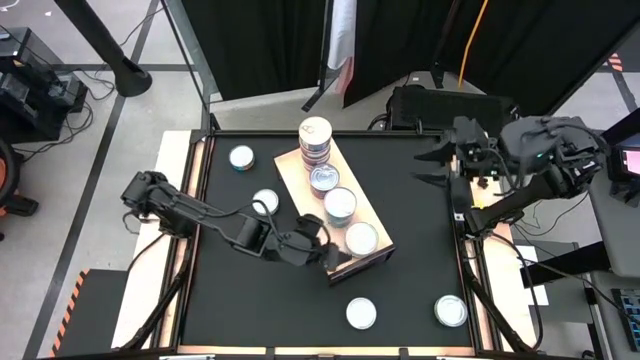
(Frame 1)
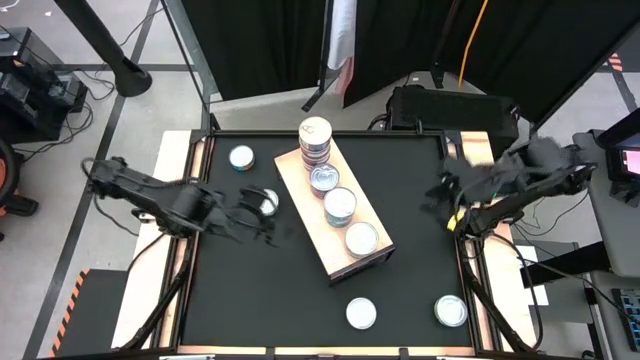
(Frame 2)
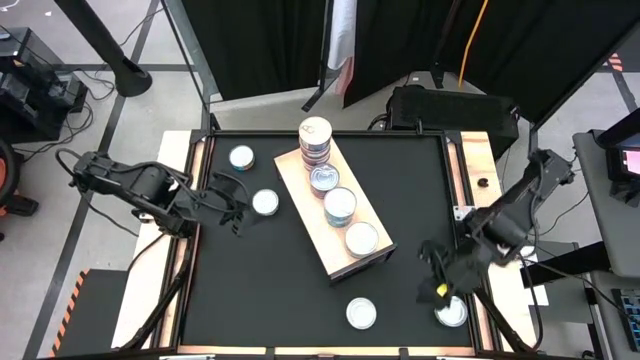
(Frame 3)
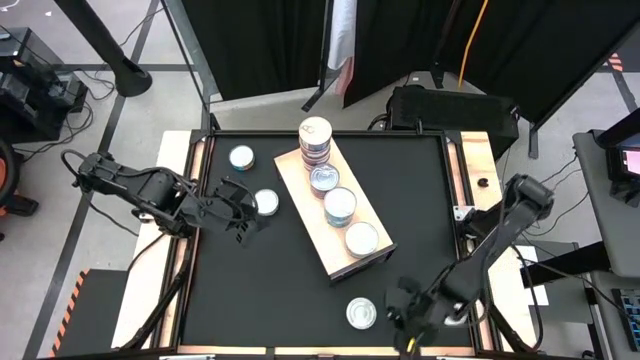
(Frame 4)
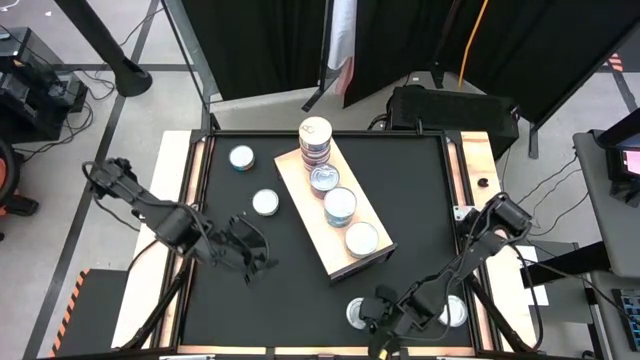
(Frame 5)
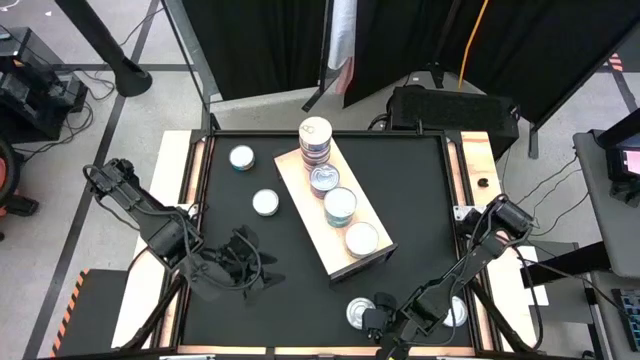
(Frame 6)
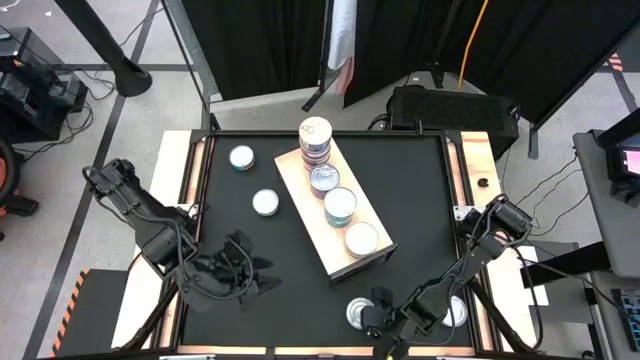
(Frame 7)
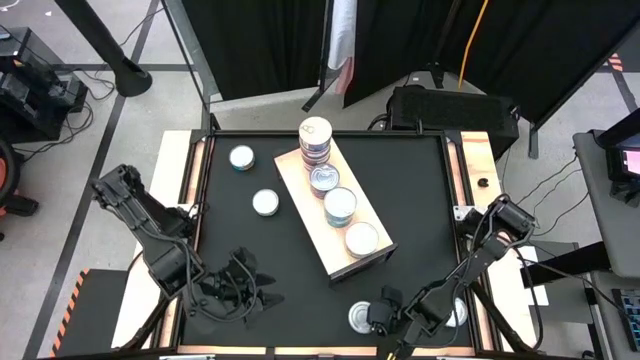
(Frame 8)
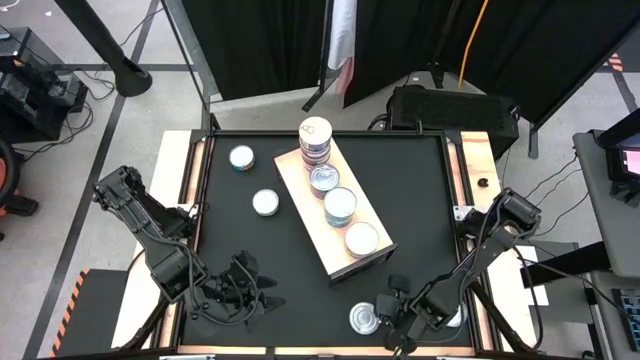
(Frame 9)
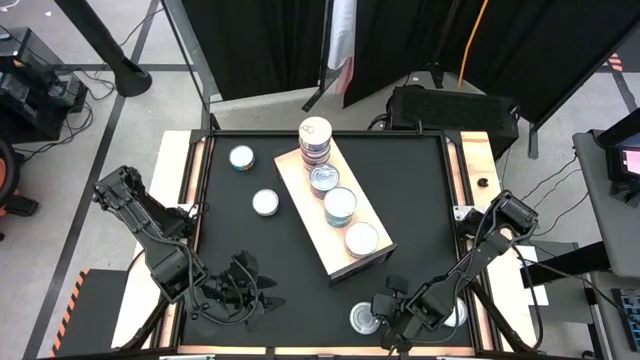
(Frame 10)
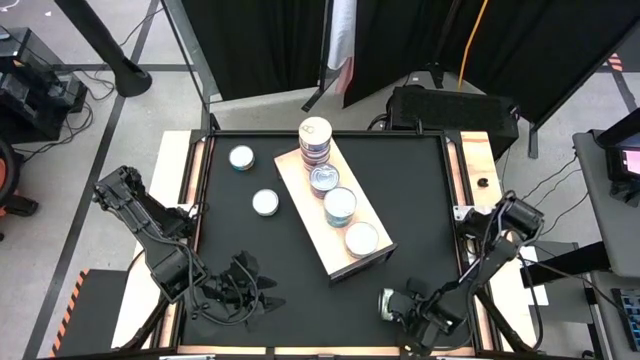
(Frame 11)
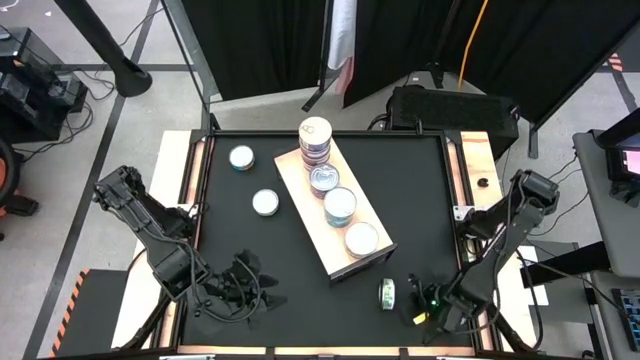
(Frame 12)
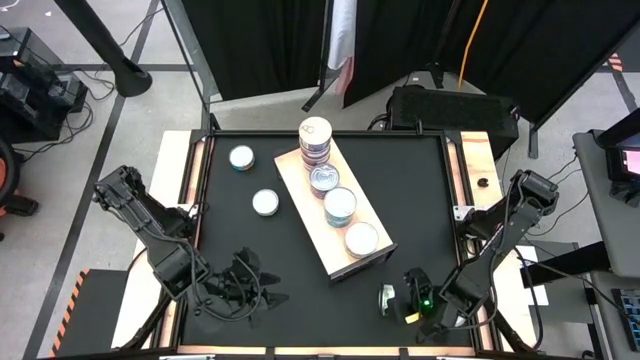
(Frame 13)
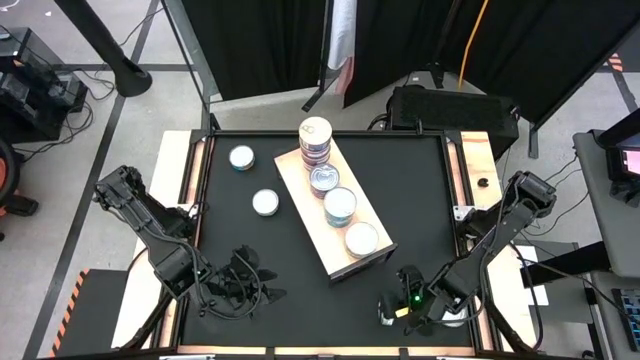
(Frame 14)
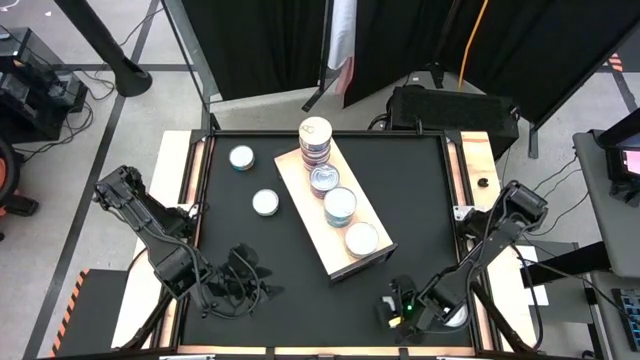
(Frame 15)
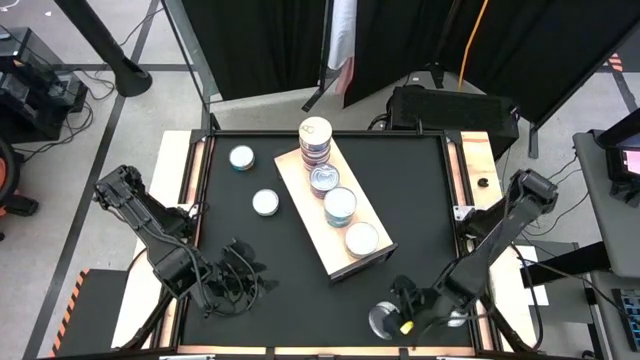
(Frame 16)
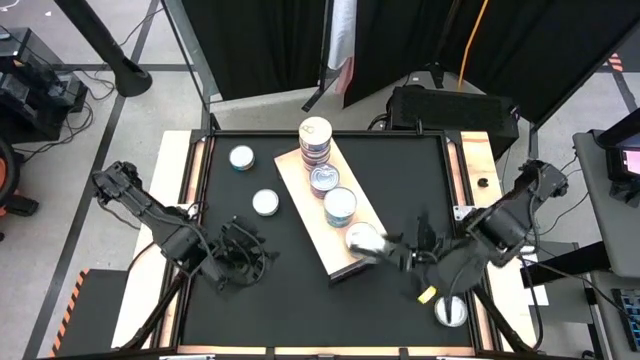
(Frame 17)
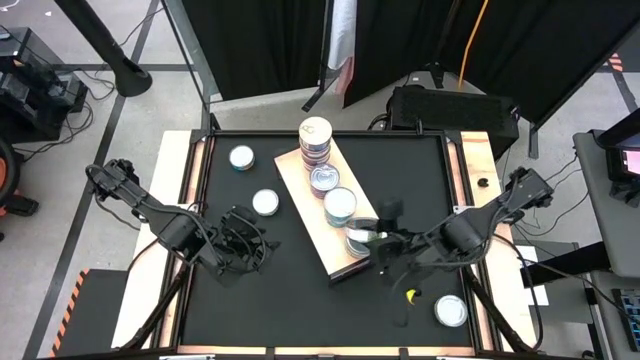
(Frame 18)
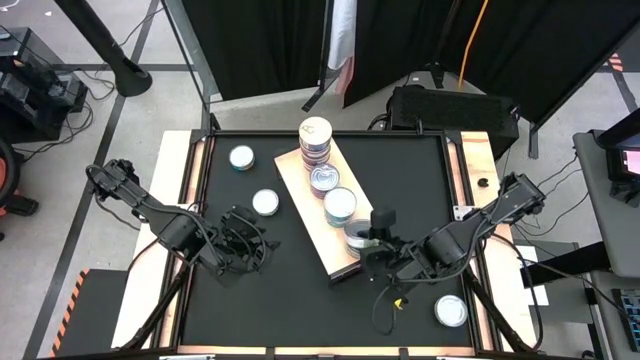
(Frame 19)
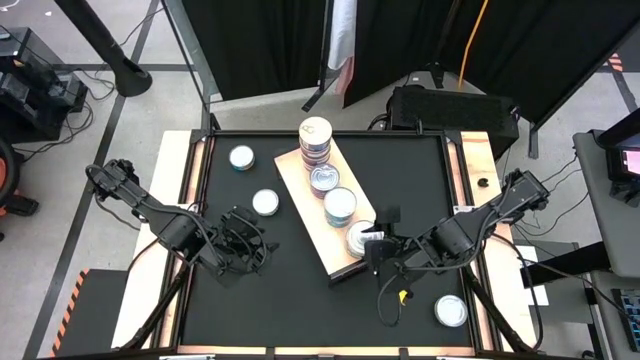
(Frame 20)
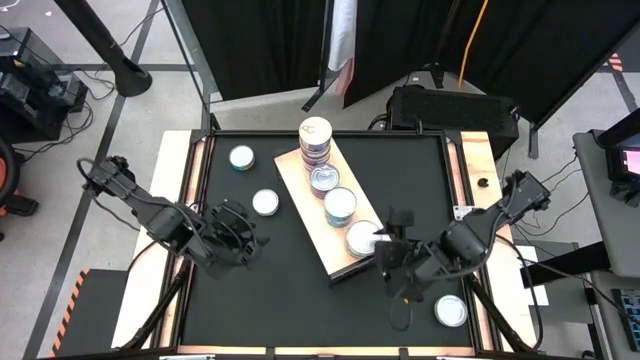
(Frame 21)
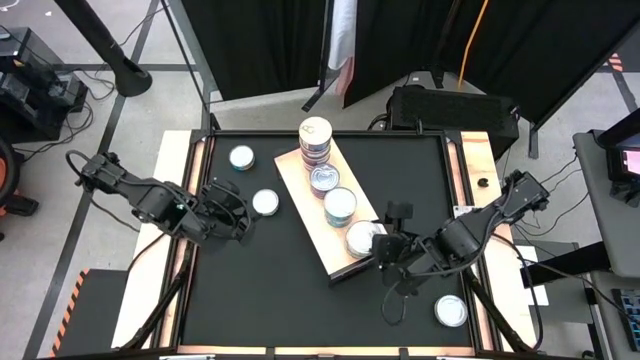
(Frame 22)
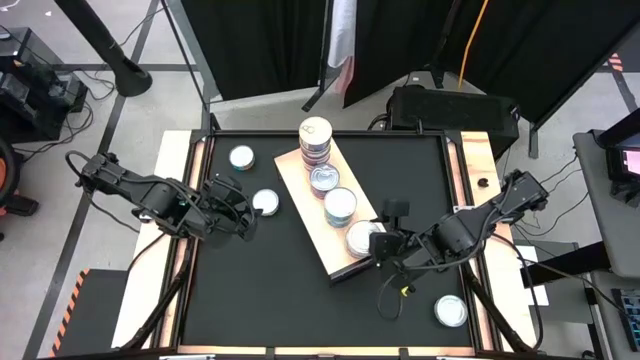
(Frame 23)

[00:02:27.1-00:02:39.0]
Task: Stack canned seafood by type on shelf
Stack the green tuna can on top of the stacked green tuna can on the shelf

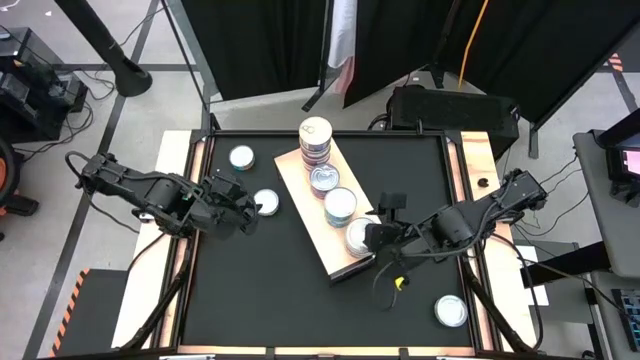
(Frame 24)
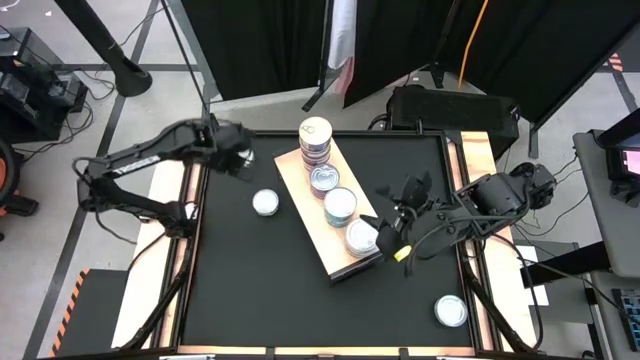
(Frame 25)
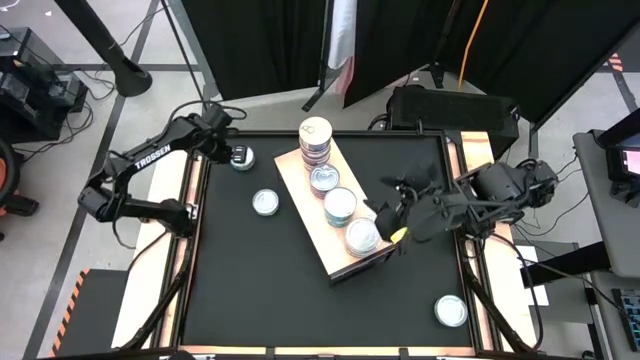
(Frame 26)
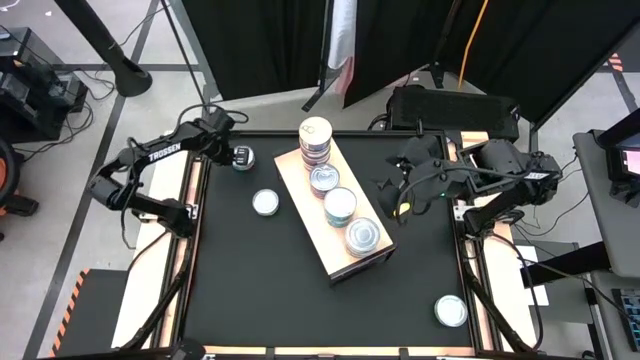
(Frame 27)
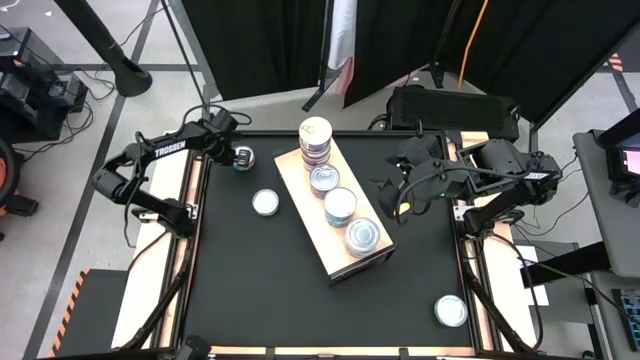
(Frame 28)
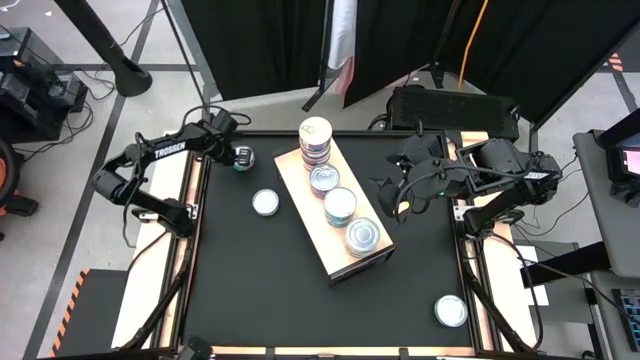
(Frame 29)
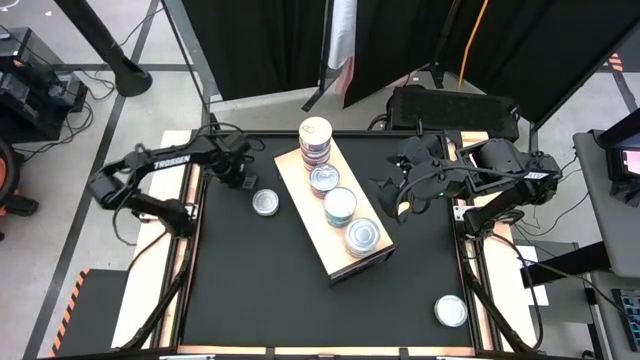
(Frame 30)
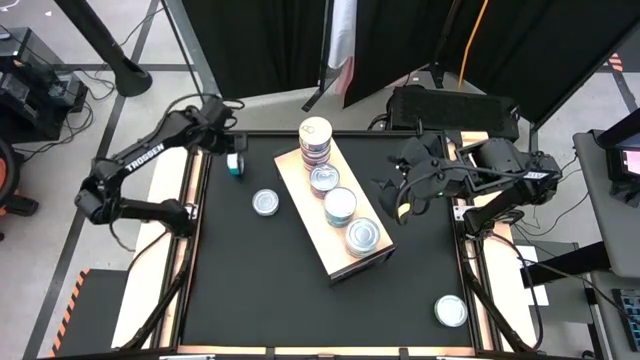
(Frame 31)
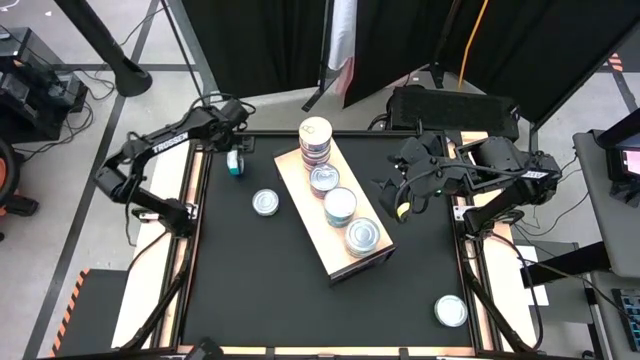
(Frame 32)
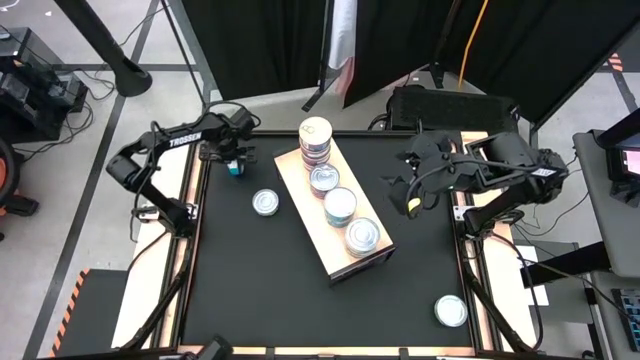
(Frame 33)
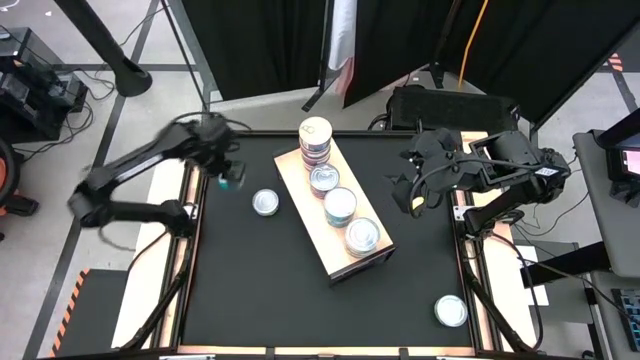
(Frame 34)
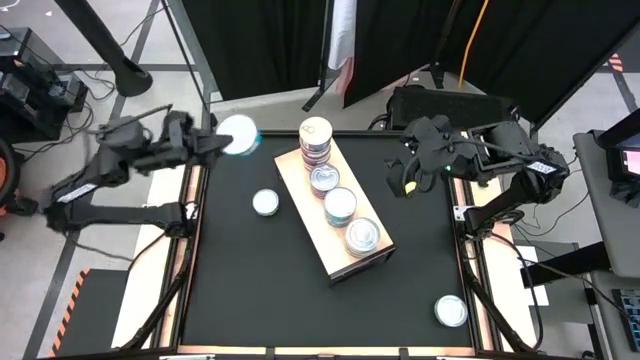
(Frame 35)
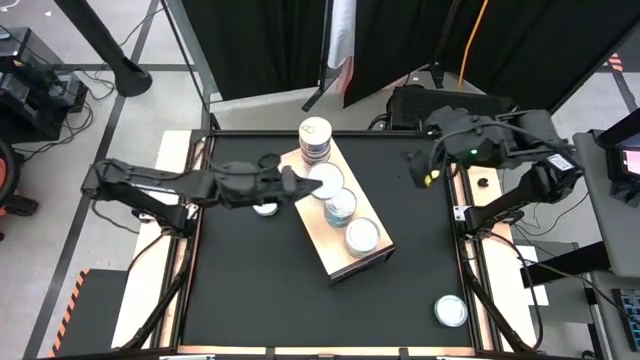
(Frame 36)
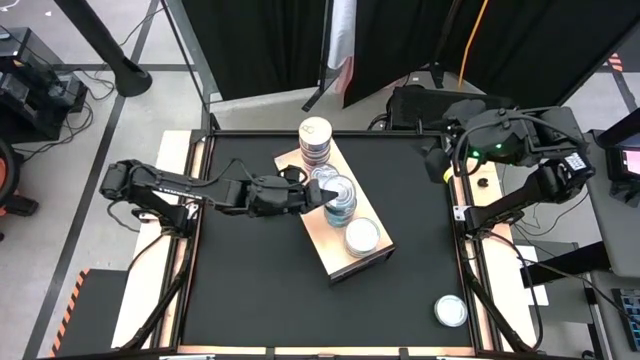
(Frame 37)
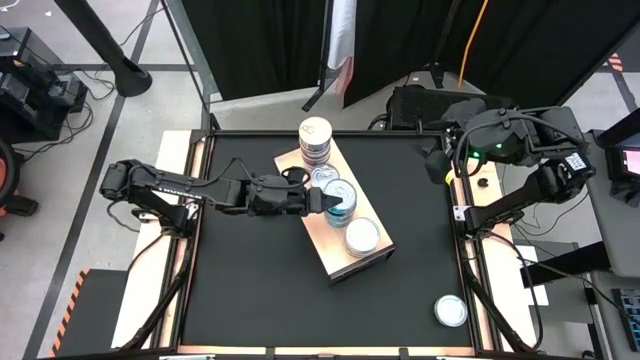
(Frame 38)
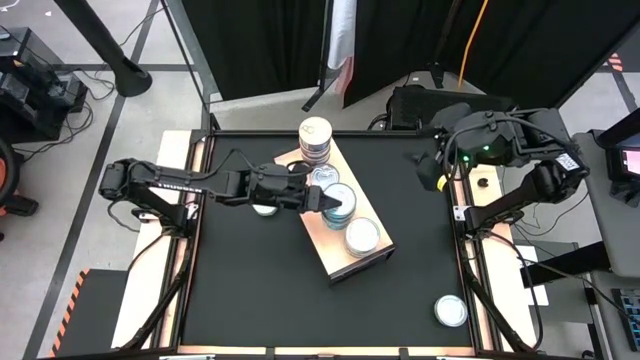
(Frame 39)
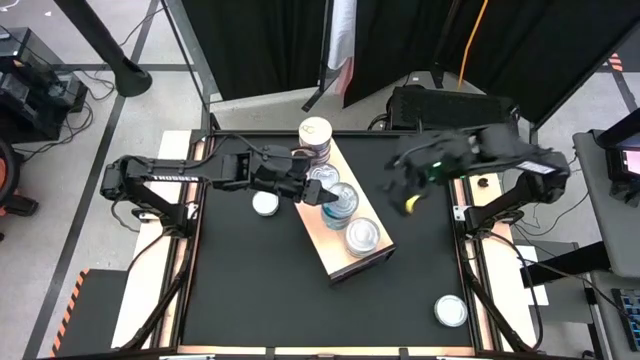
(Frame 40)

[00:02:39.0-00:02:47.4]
Stack the yellow-blue tuna can on top of the stacked yellow-blue tuna can on the shelf

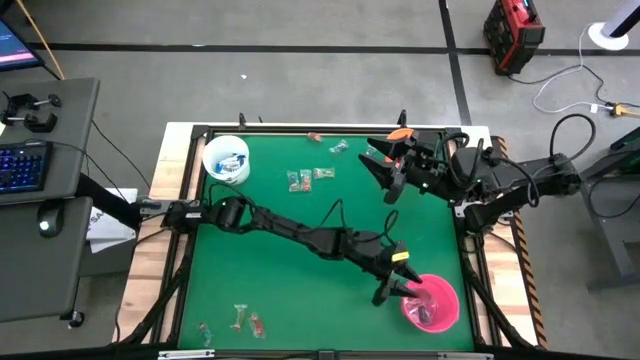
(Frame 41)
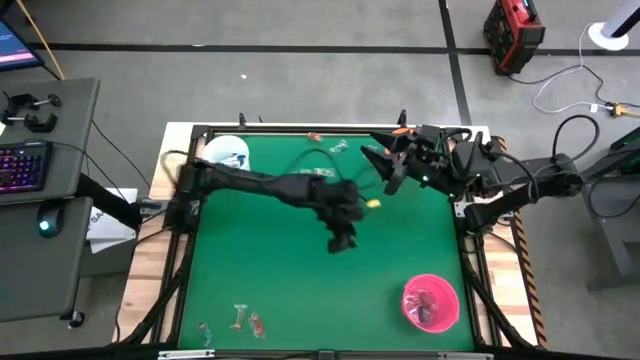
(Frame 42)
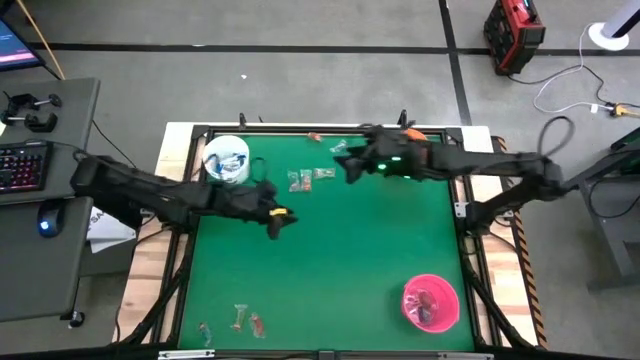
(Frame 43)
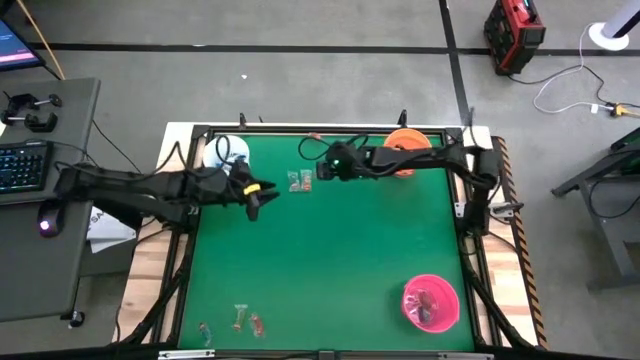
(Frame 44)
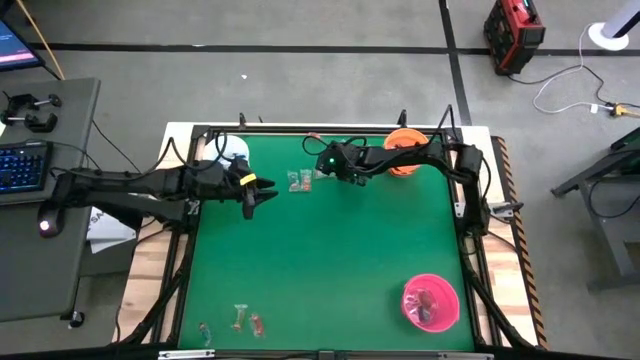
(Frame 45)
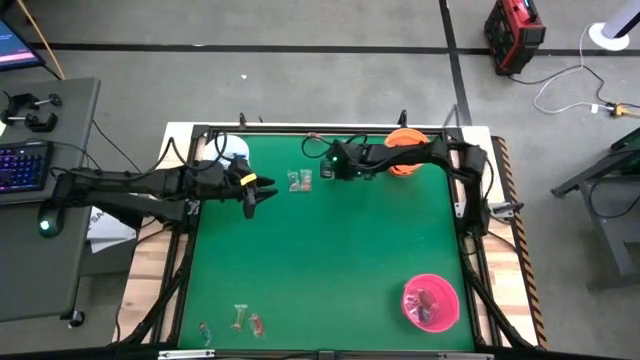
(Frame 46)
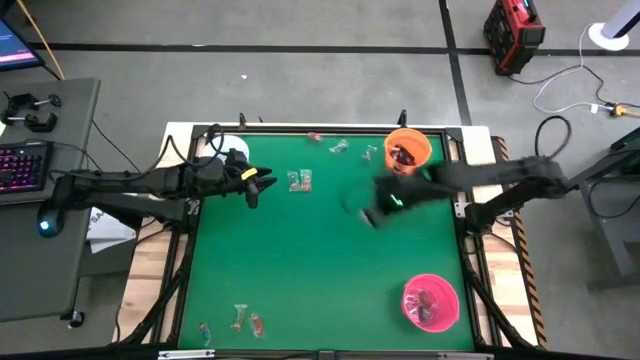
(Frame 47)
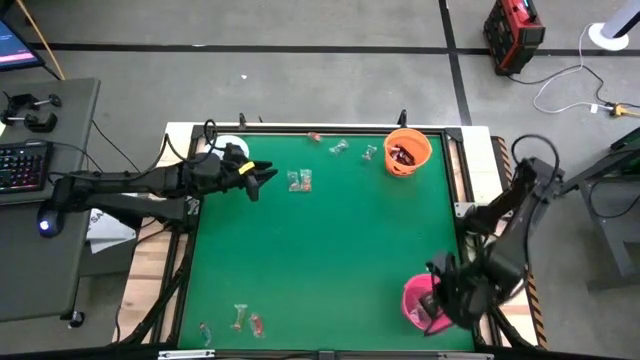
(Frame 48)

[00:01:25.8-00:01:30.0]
Task: Sort candy by brand, put in halloween buckets
Put the green gummy into the pink bucket
